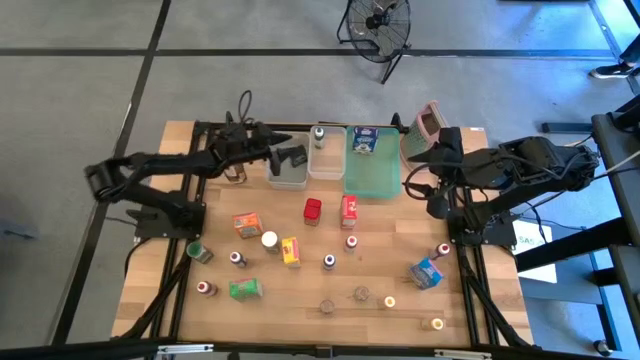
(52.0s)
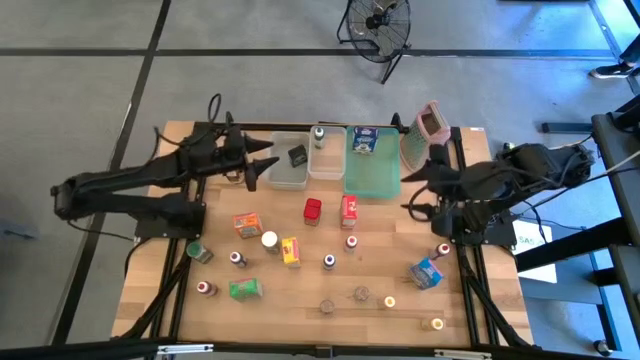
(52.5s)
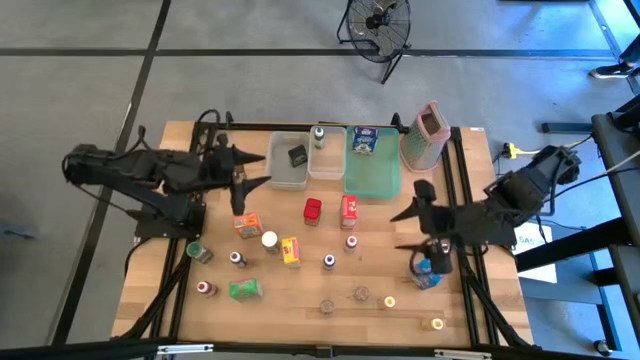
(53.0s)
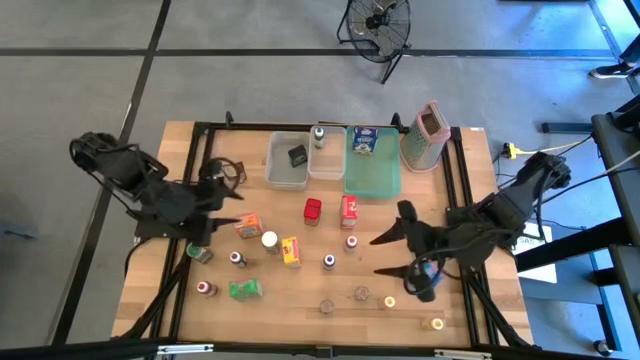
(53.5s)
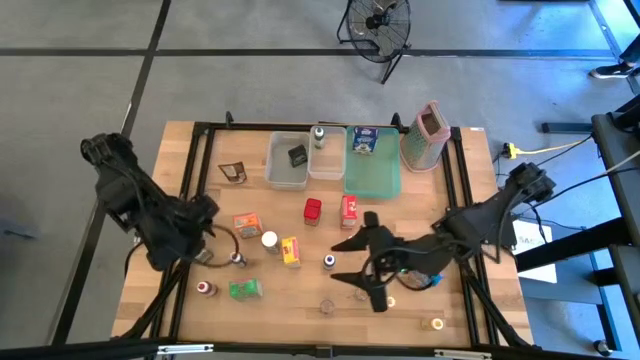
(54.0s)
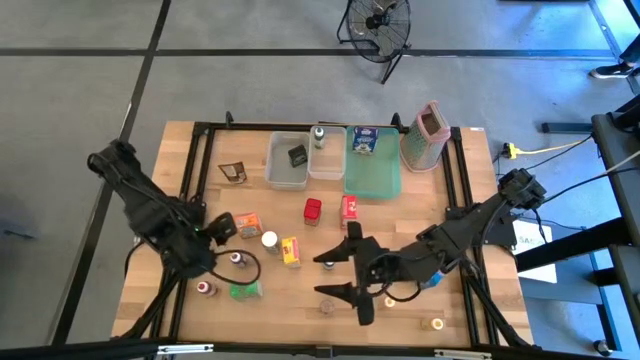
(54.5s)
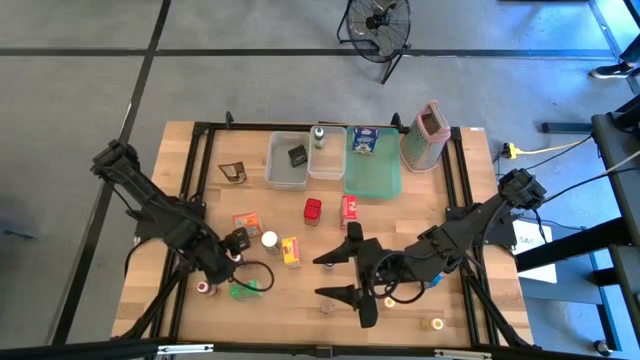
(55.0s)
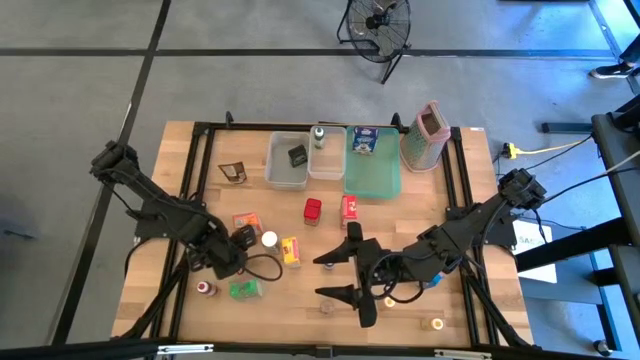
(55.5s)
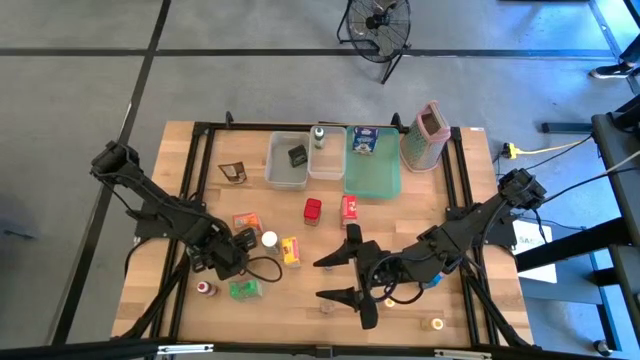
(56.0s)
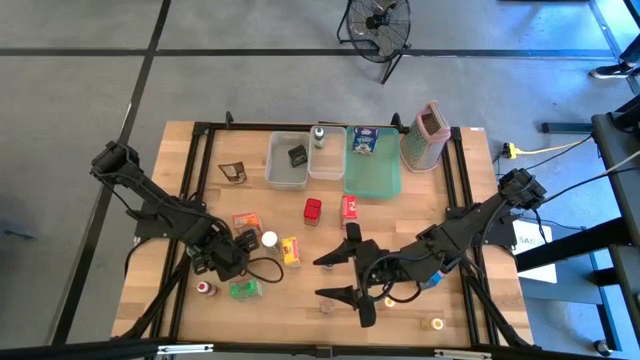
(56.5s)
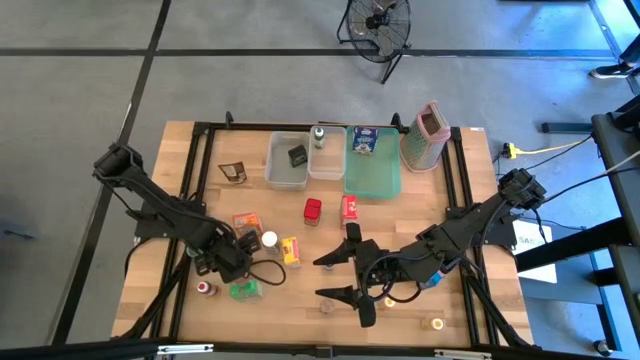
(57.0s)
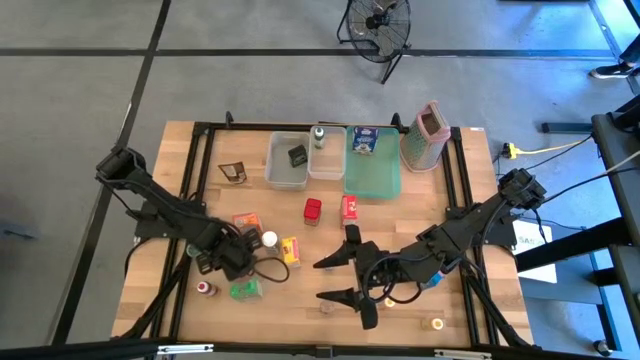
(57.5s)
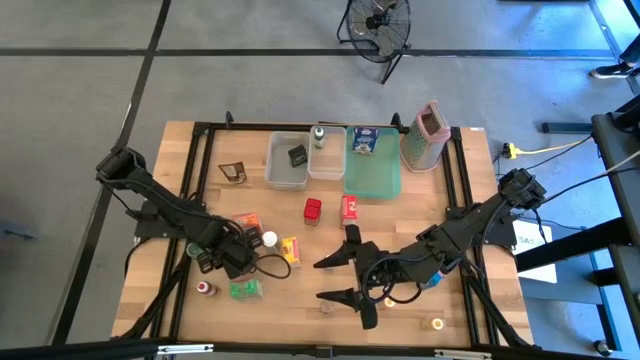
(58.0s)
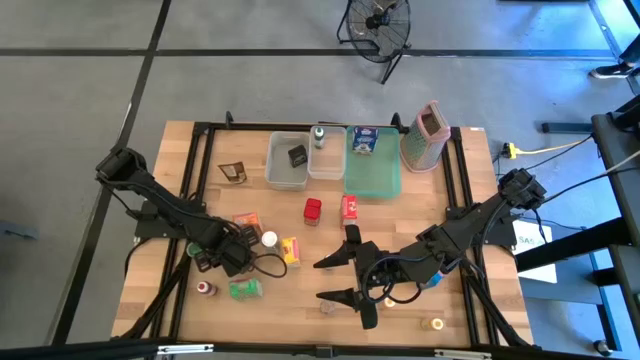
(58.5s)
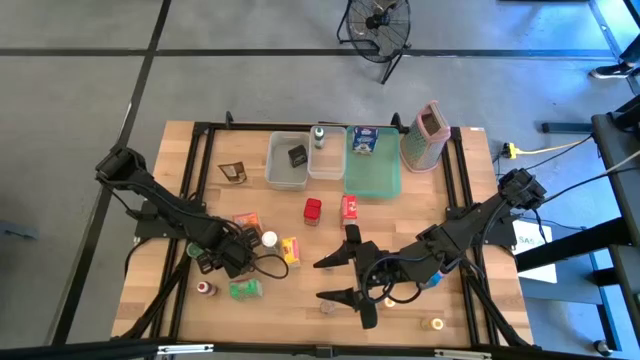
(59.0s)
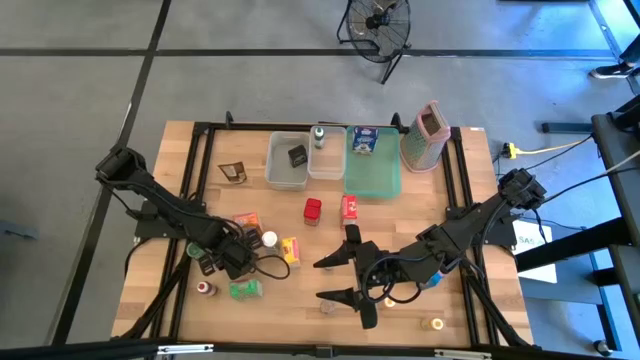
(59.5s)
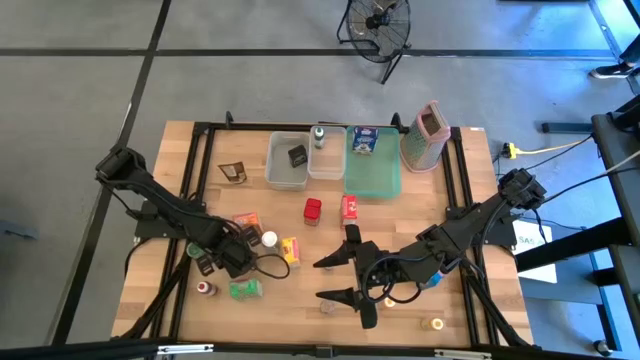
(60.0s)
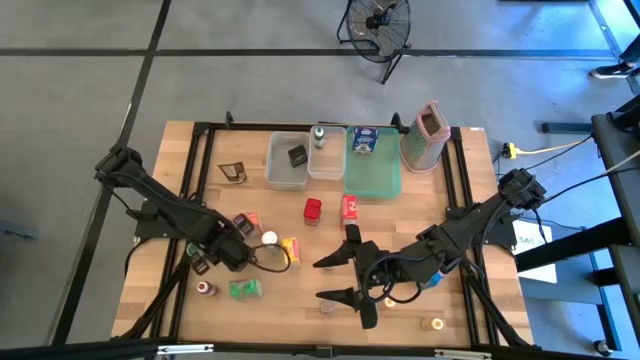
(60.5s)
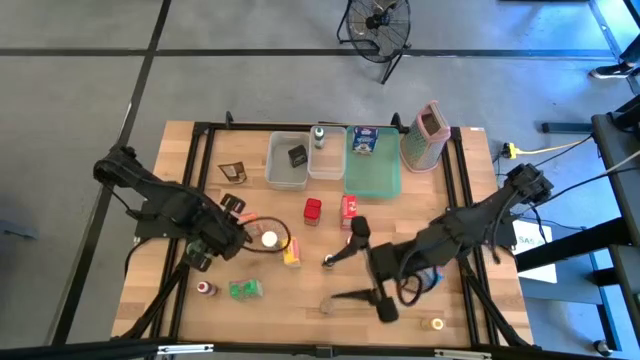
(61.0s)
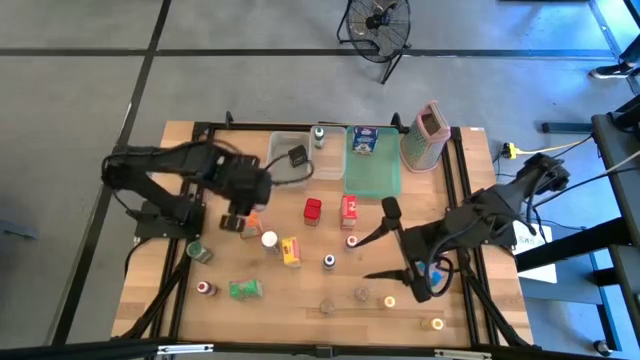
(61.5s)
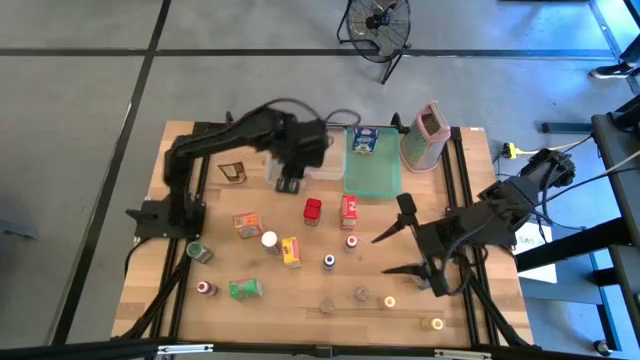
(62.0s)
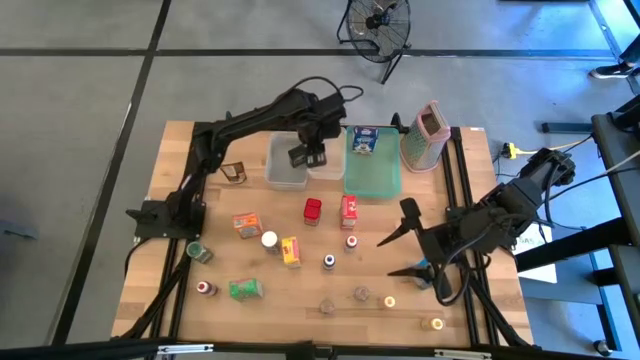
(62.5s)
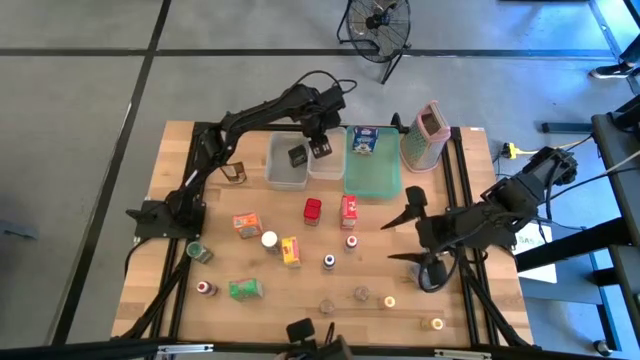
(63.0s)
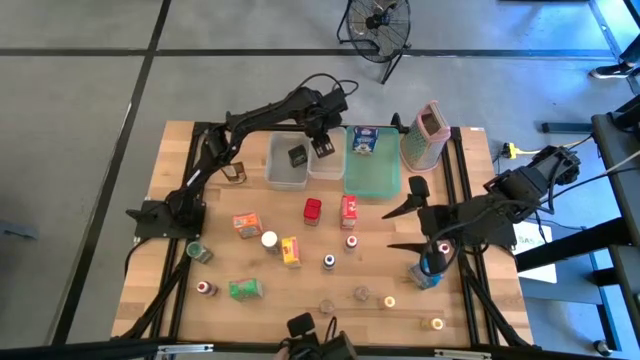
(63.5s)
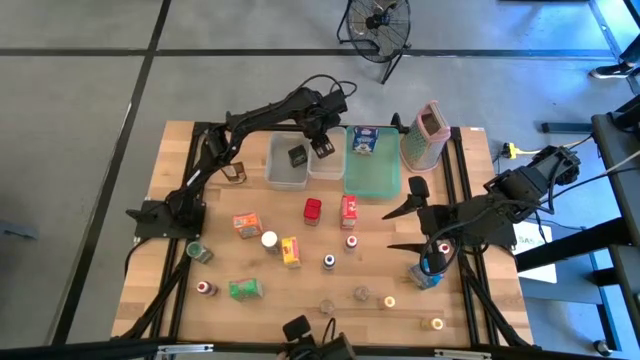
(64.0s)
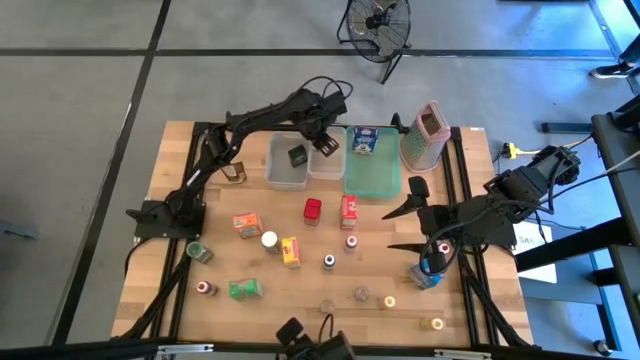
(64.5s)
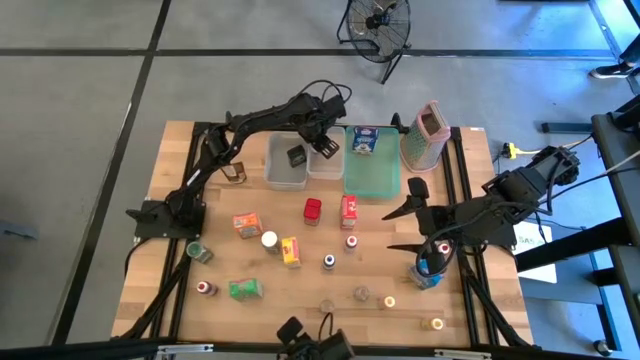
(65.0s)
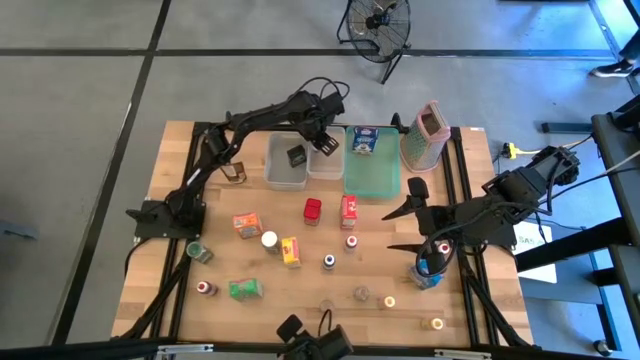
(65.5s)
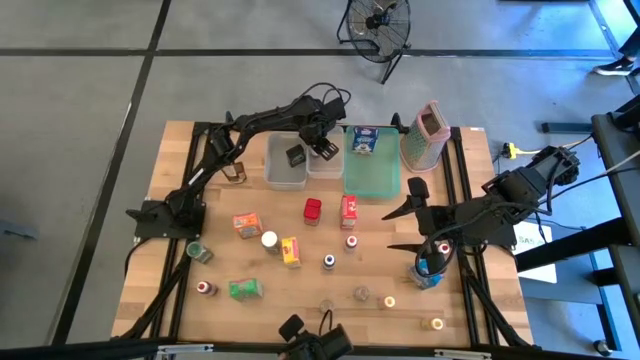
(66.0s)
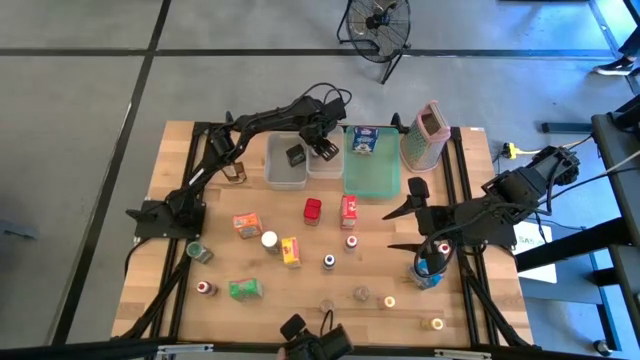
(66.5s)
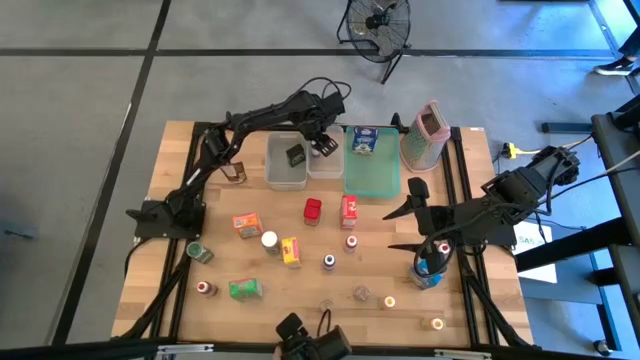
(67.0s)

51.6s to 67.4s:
Task: Pick & Place Kitchen Items
Put the purple food coloring bottle into the transparent bin

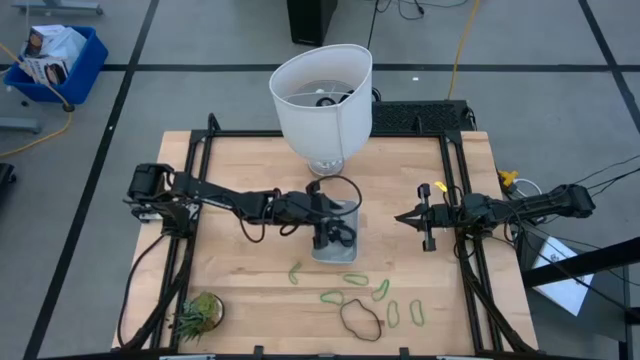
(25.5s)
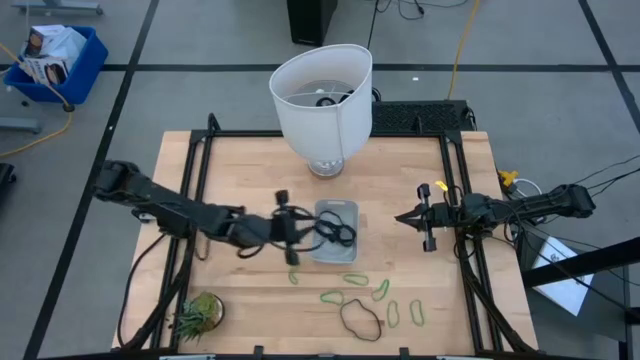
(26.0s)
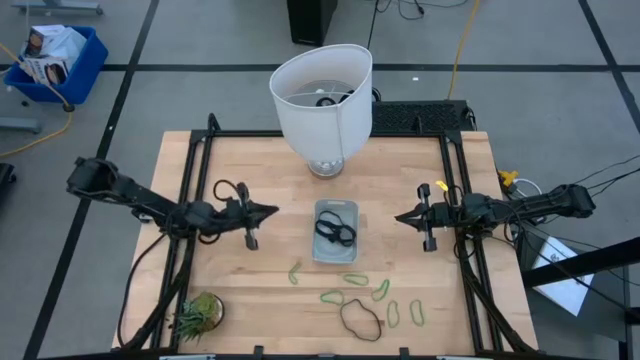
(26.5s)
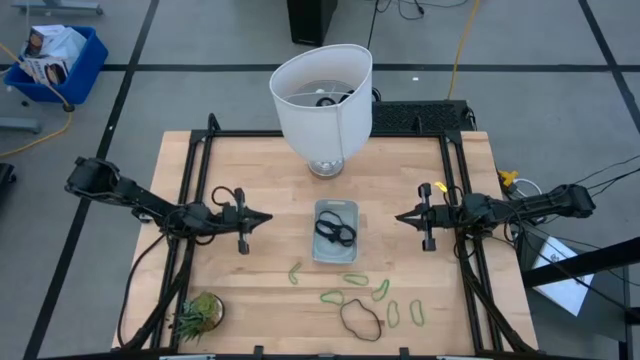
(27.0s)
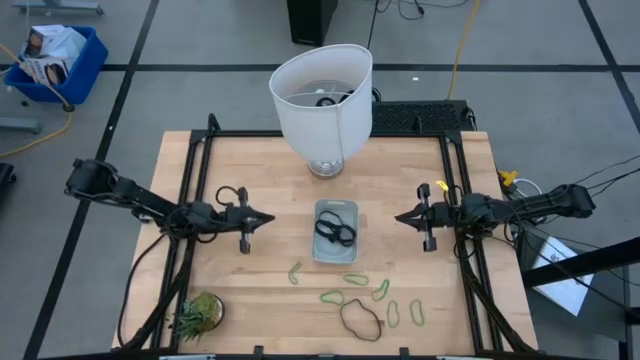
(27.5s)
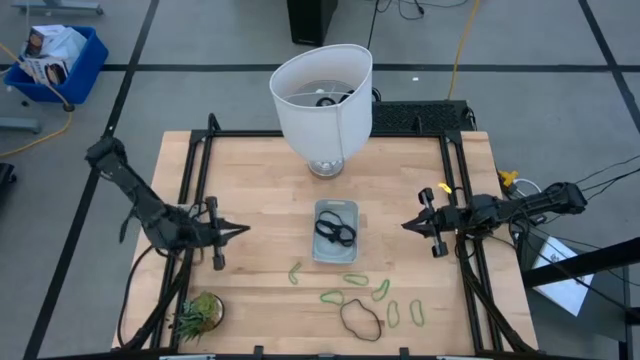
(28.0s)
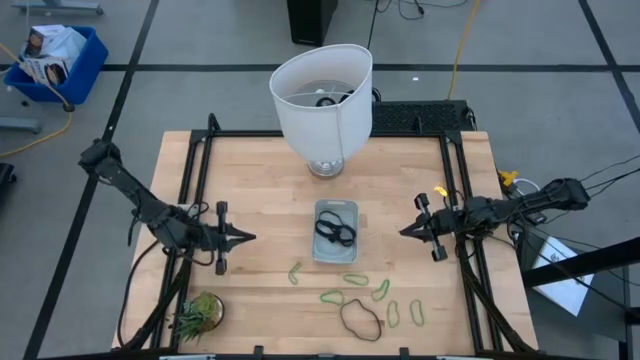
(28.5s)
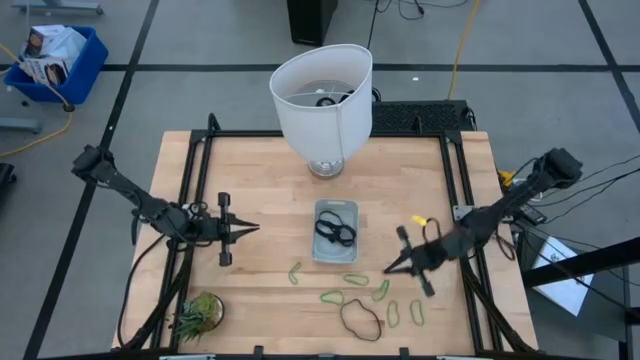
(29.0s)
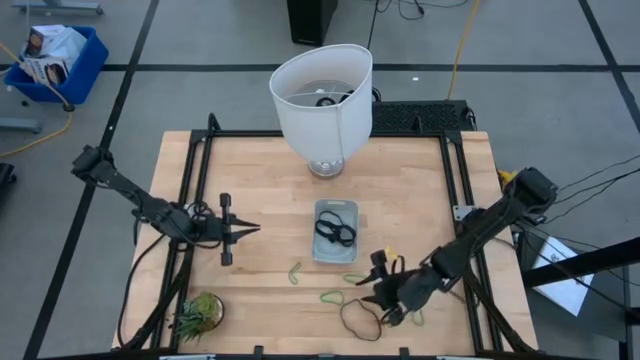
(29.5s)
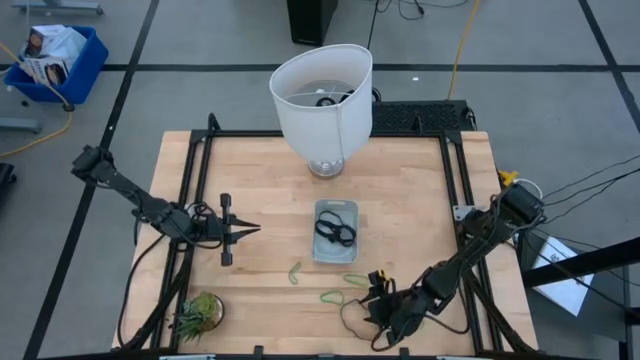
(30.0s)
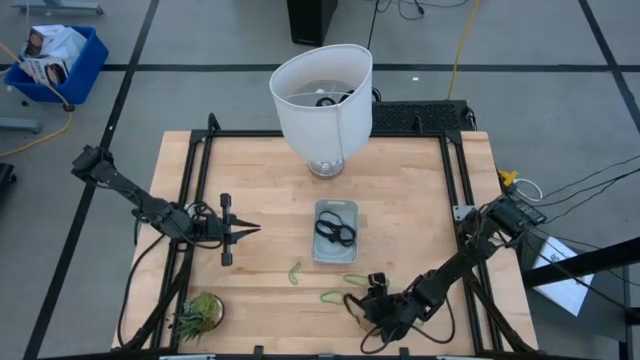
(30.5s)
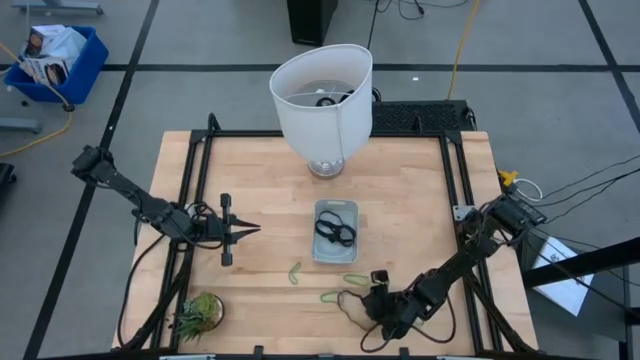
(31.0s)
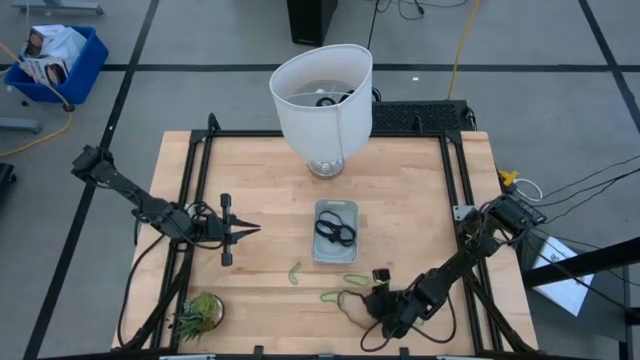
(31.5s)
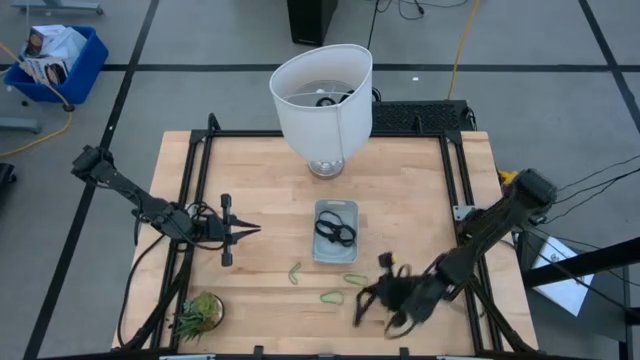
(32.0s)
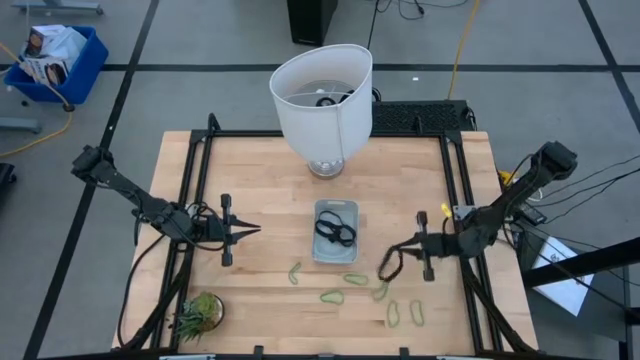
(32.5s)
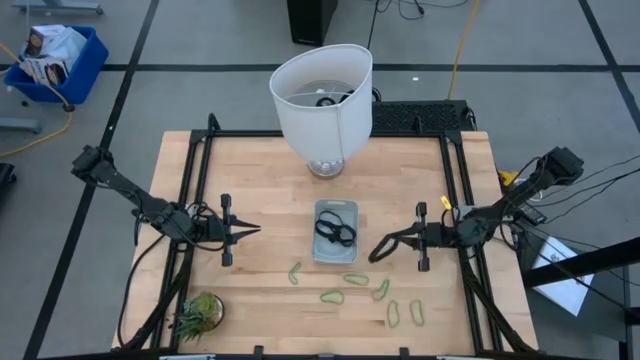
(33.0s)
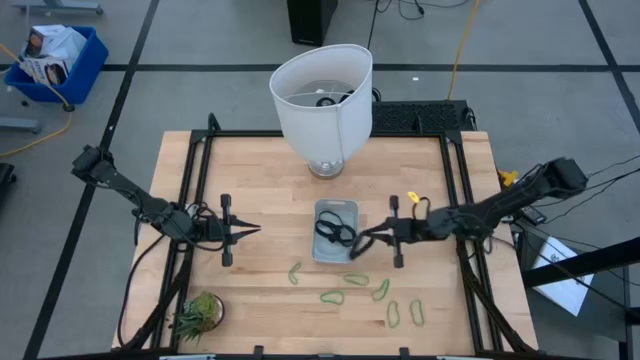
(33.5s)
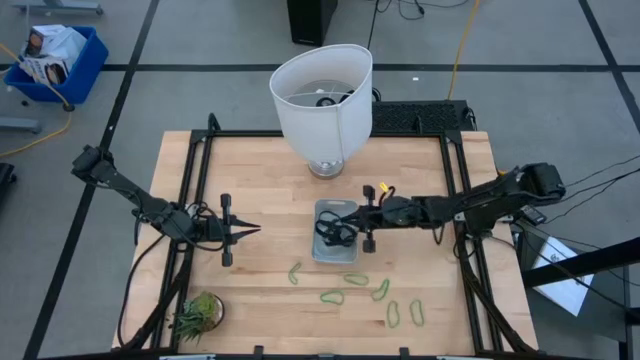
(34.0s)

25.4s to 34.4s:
Task: Pick and place rubber bands into bin
Put the black rubber band into the gray bin
